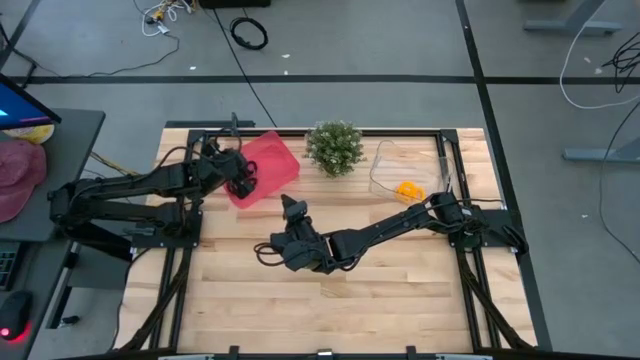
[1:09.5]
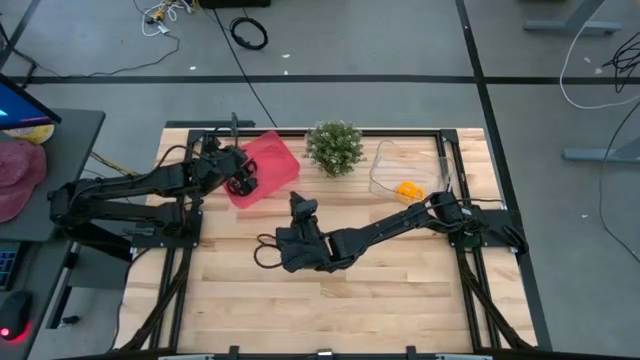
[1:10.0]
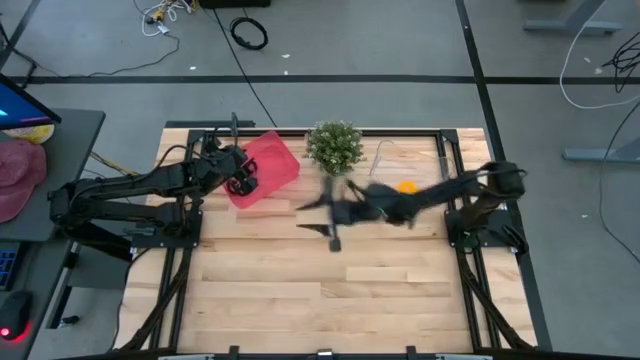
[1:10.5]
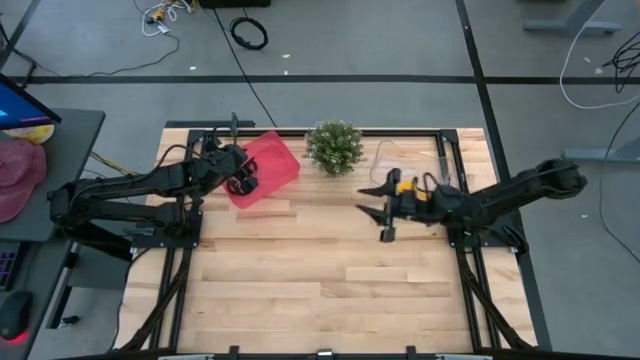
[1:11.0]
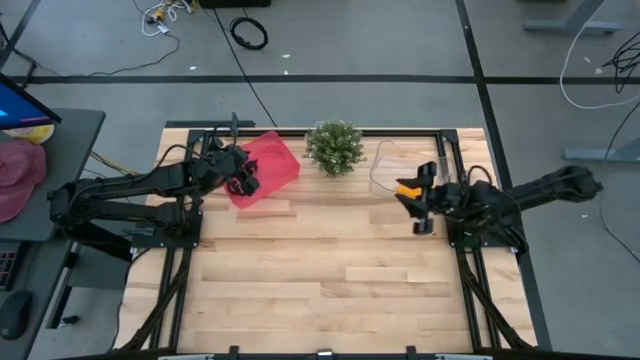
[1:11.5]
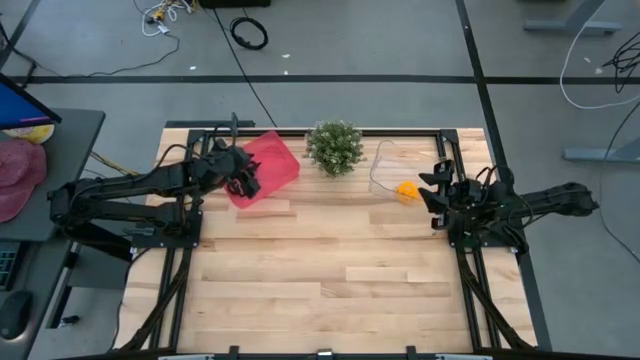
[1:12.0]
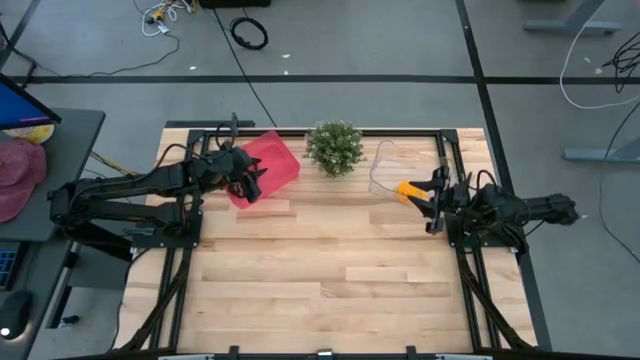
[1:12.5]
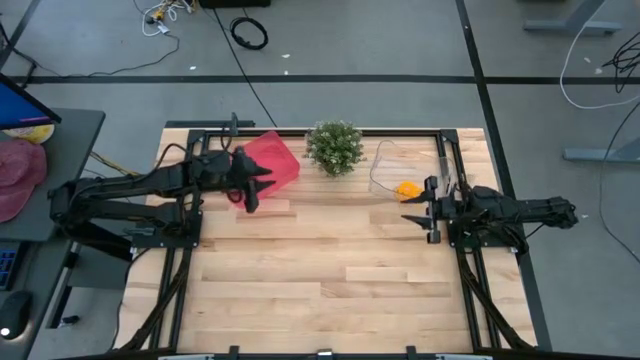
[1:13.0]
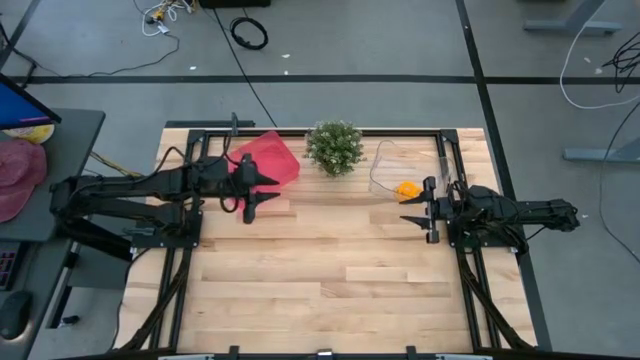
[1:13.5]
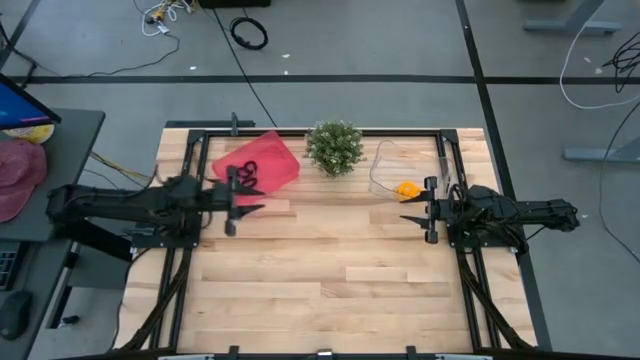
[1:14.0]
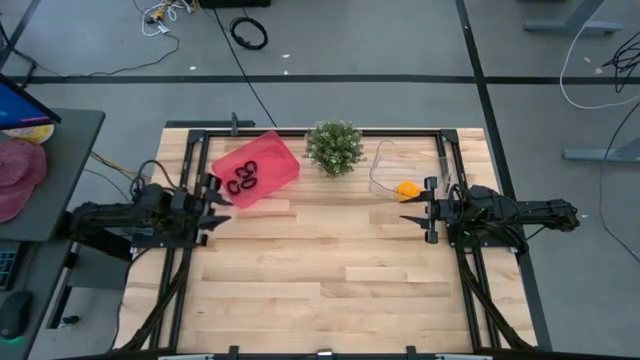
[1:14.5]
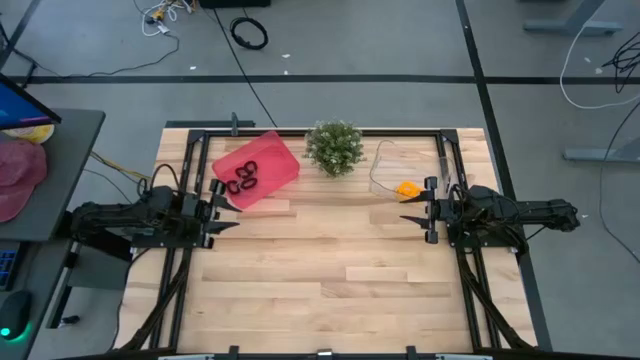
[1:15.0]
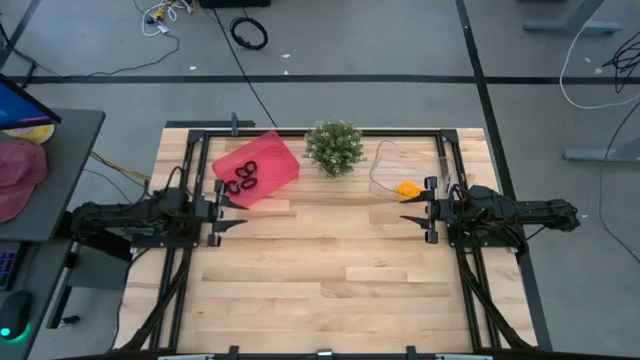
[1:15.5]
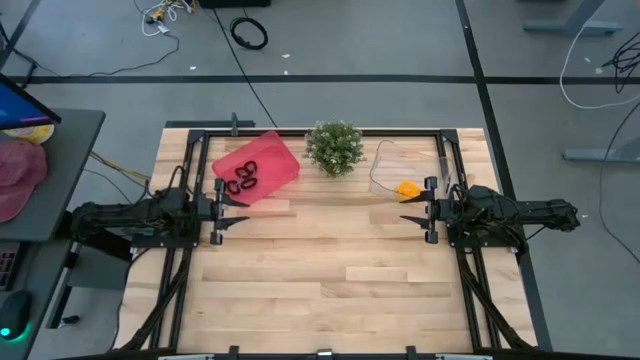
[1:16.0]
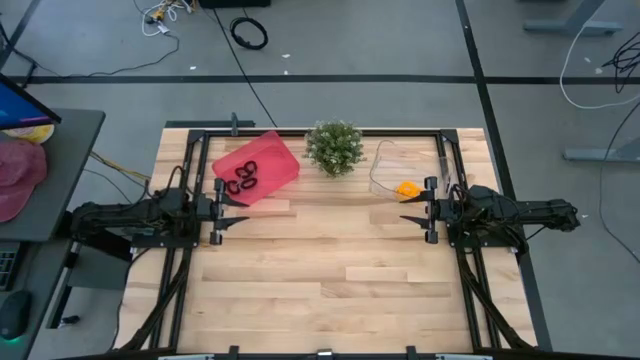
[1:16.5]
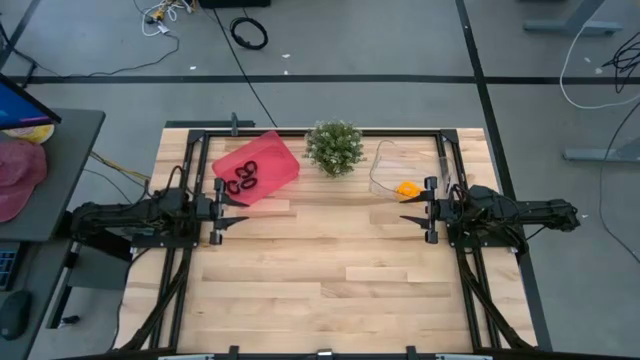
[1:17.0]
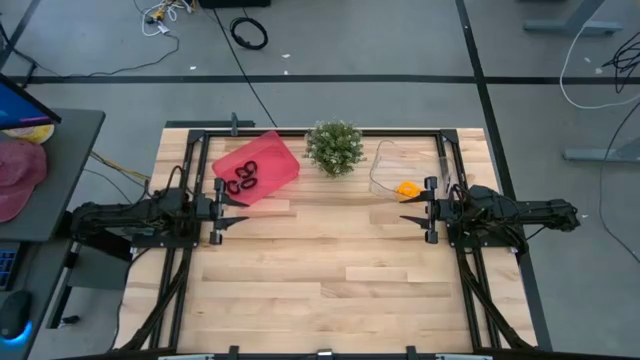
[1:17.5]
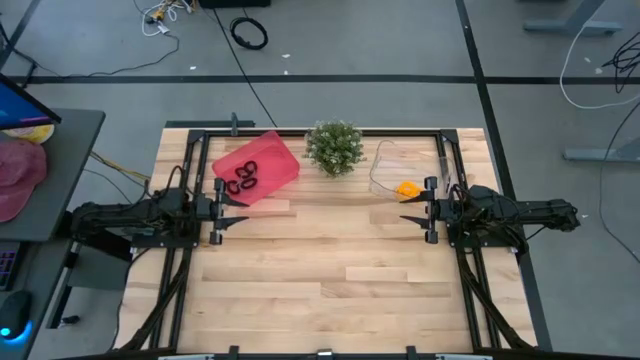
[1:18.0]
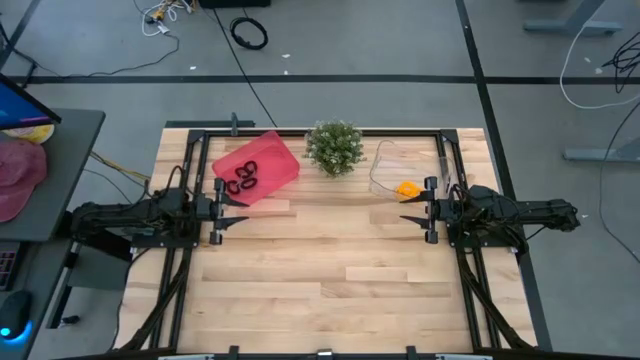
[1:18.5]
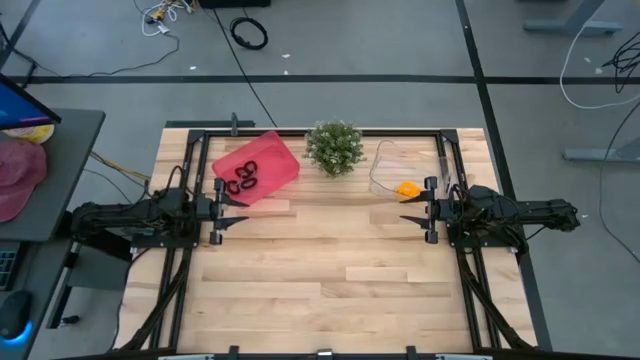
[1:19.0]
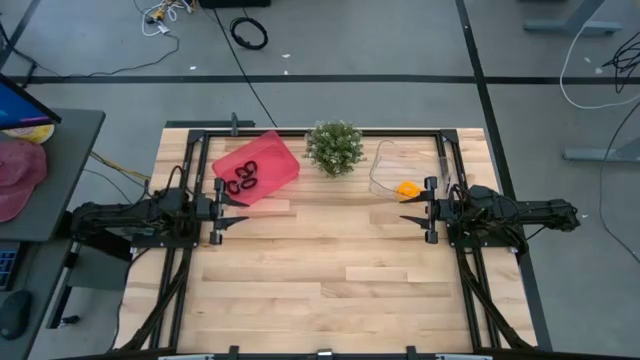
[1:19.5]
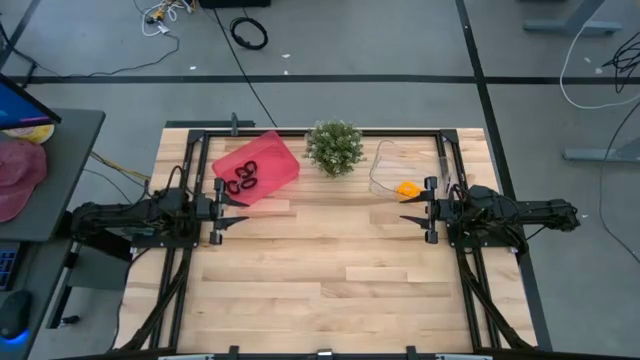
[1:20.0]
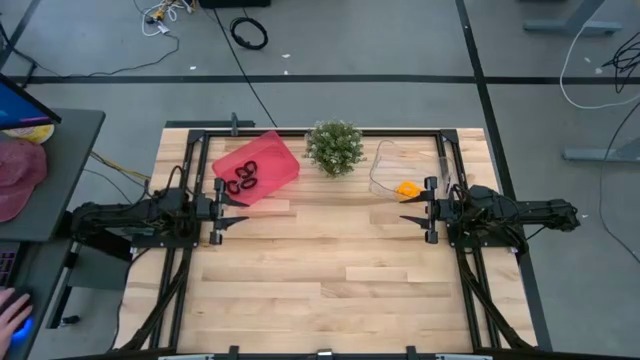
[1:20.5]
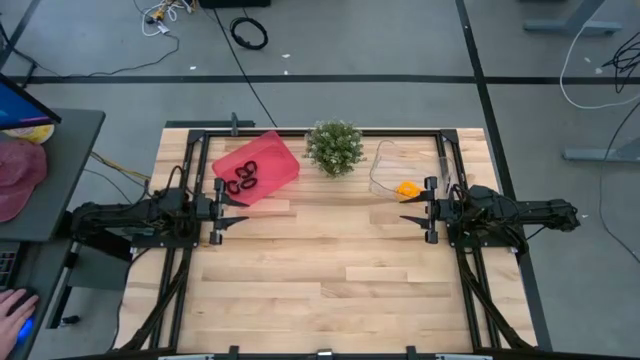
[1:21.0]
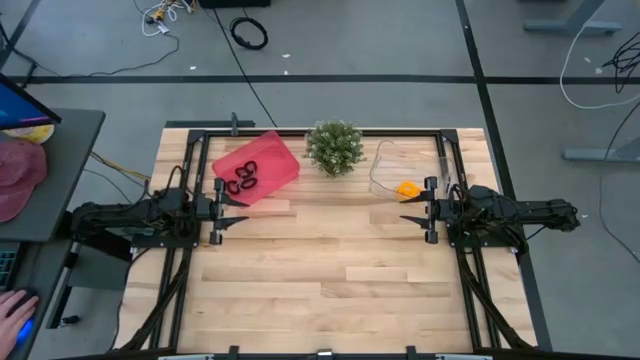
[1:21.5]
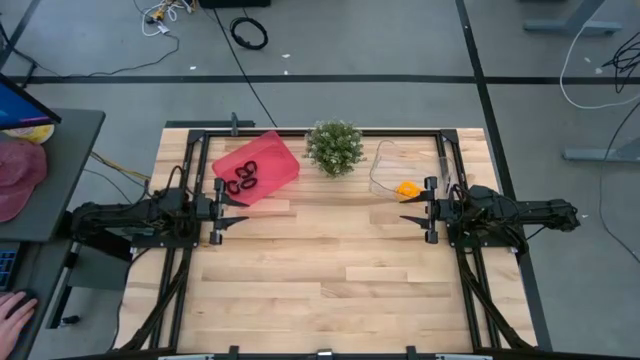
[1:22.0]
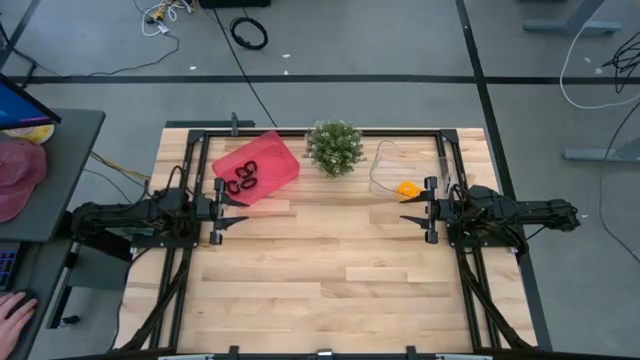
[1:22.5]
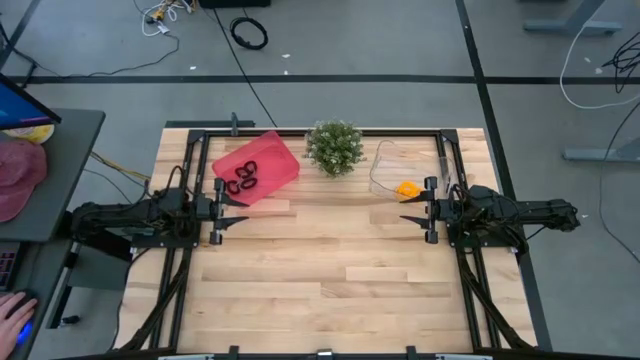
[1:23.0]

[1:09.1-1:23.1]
Task: Sort spring keychains
Return to Home Position

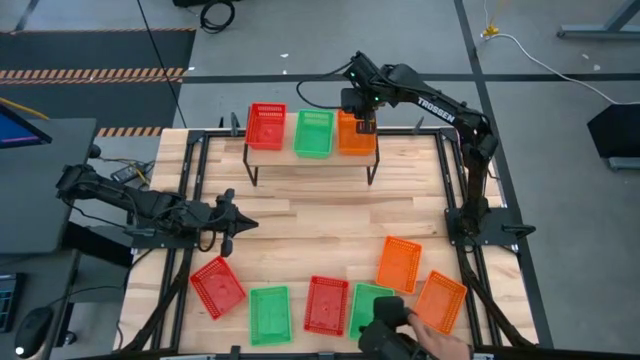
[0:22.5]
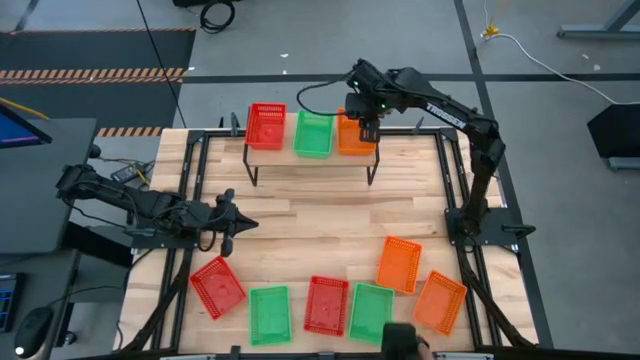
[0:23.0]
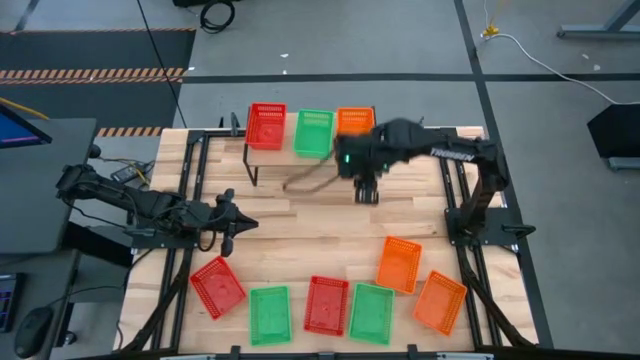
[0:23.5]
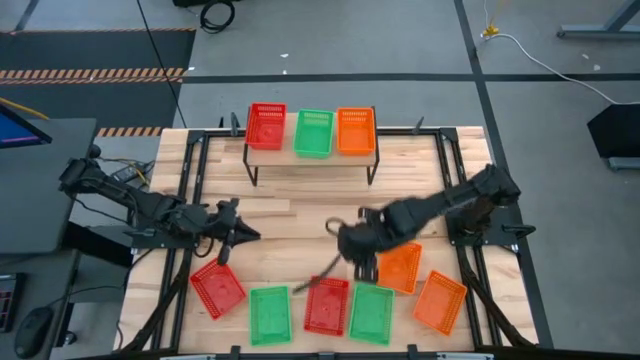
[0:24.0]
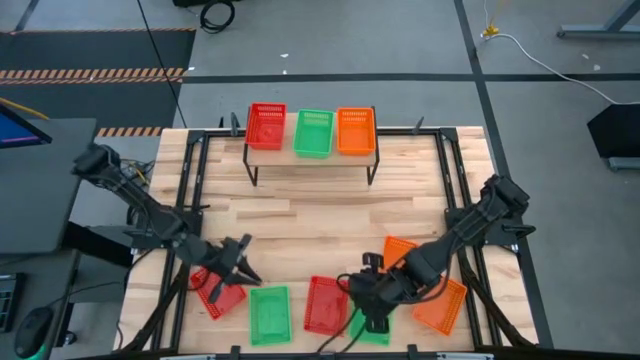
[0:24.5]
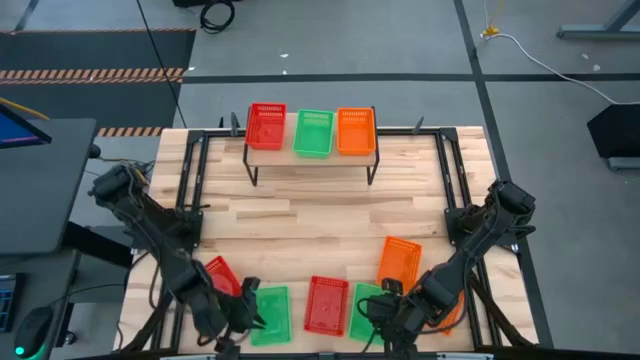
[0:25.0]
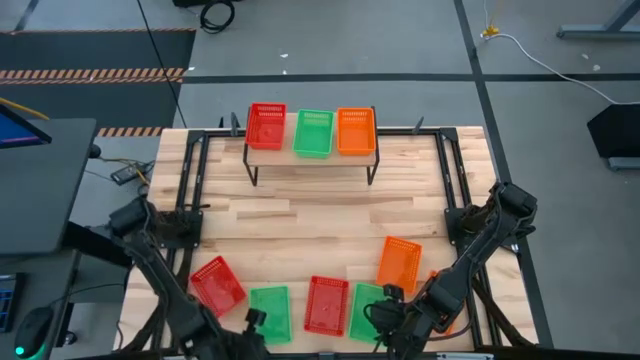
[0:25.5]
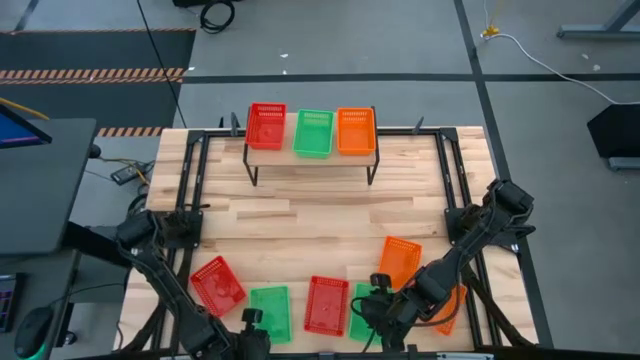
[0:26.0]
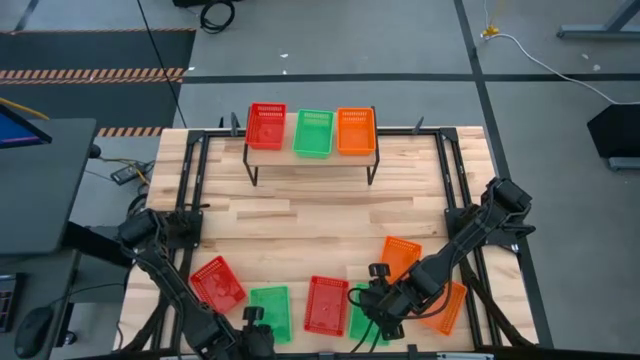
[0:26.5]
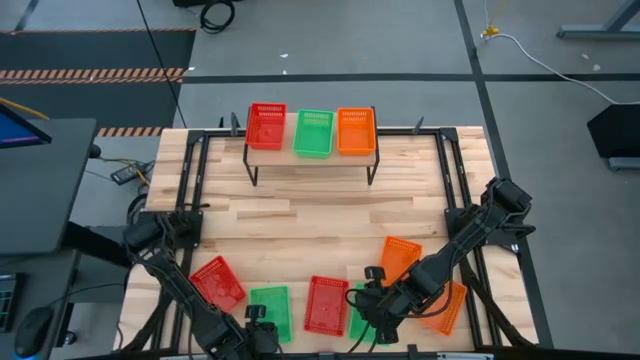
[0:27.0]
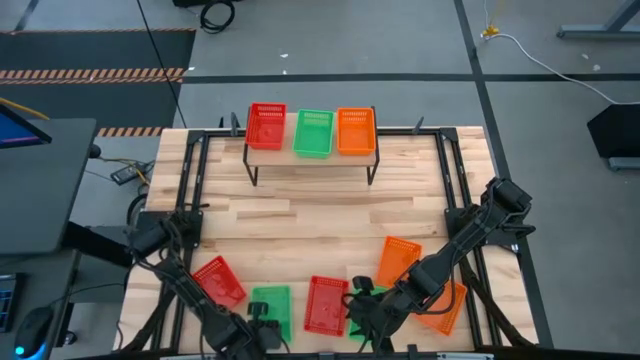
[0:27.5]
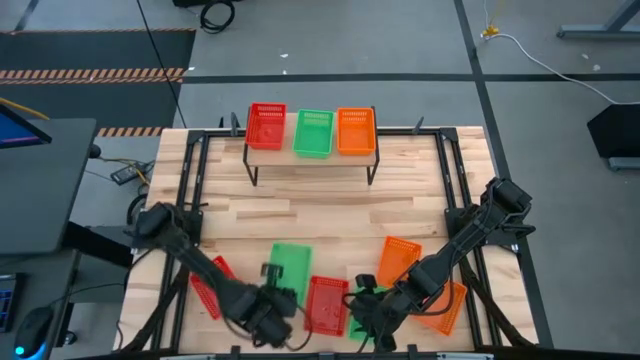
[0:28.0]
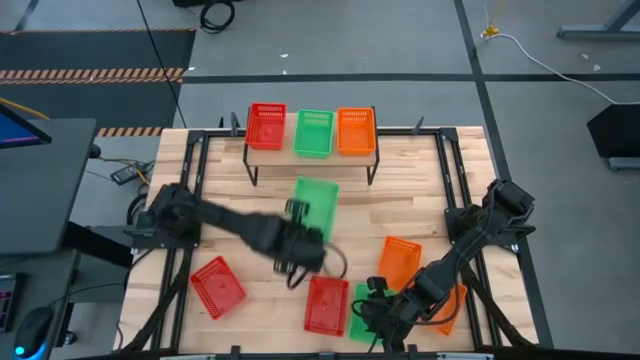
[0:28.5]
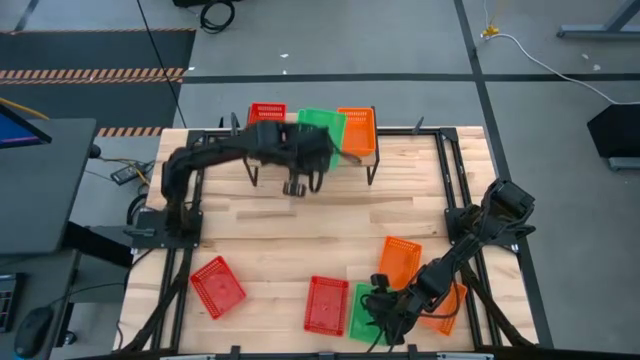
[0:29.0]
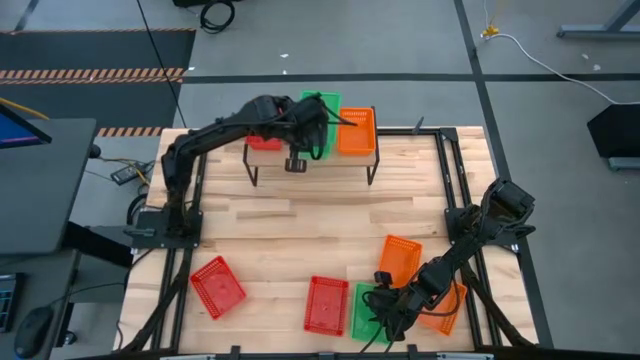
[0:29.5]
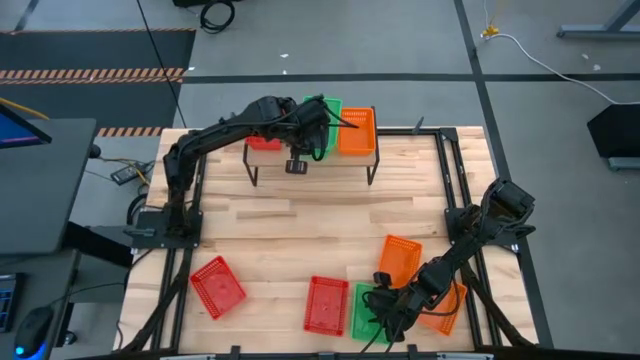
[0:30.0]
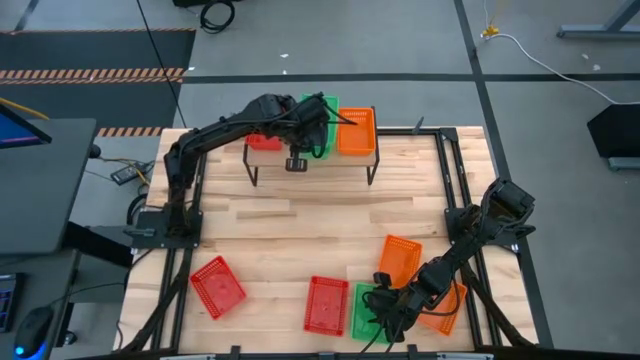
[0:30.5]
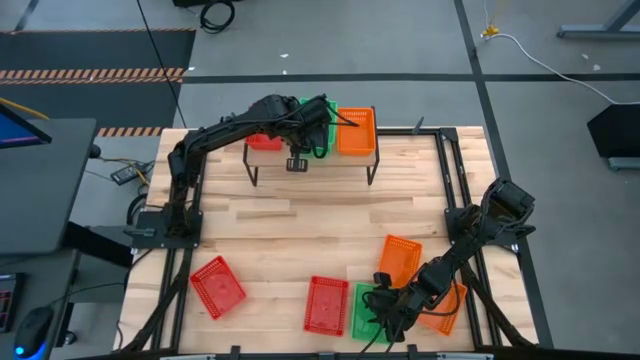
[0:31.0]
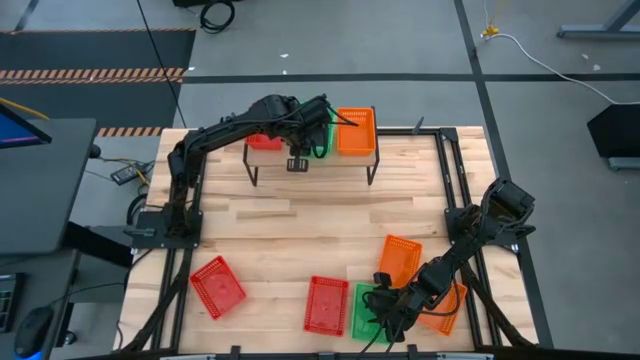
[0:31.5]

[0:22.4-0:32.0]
Task: Stack baskets on shelf by color
Stack the left green basket on top of the green basket on the shelf
